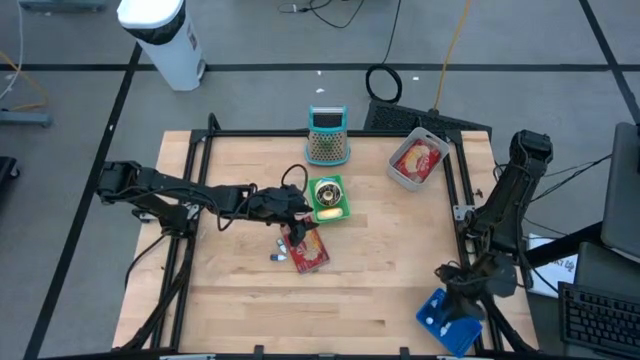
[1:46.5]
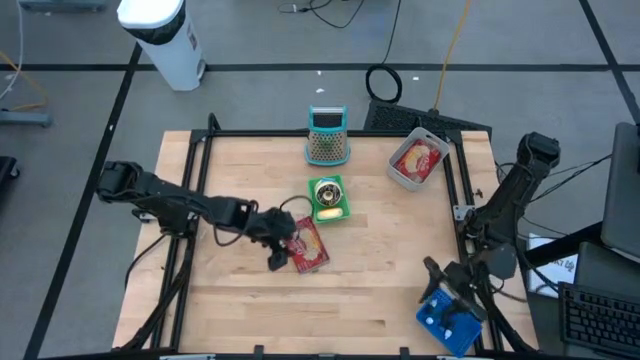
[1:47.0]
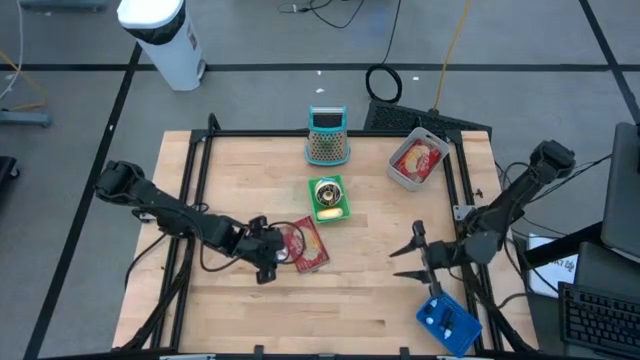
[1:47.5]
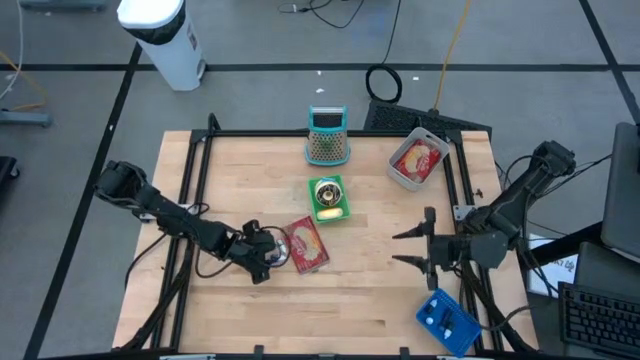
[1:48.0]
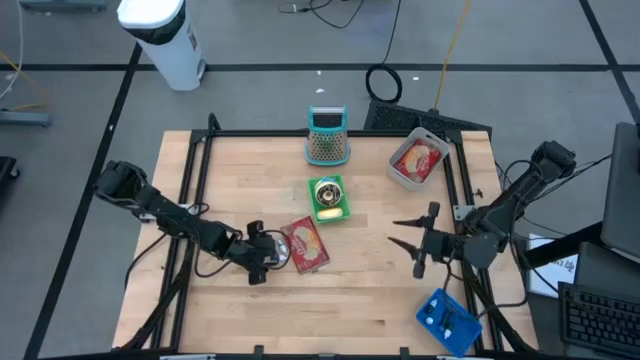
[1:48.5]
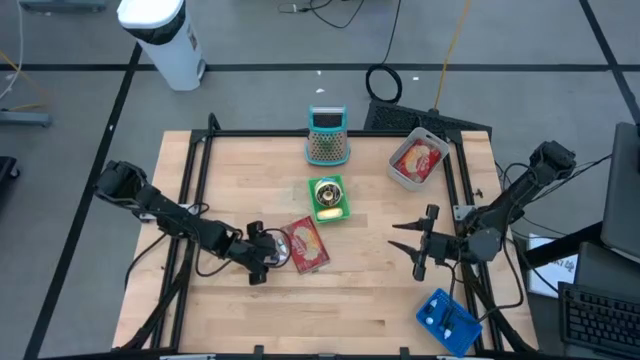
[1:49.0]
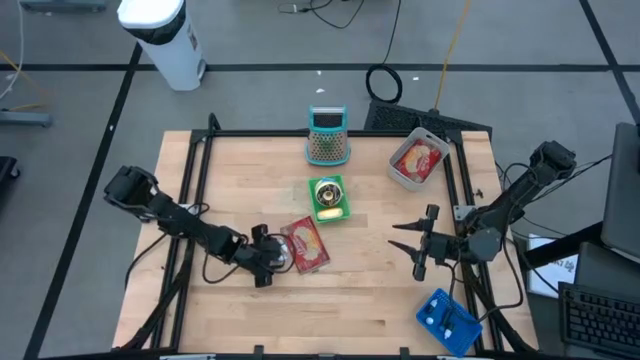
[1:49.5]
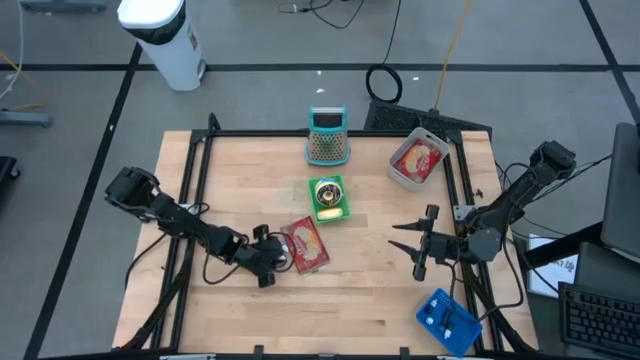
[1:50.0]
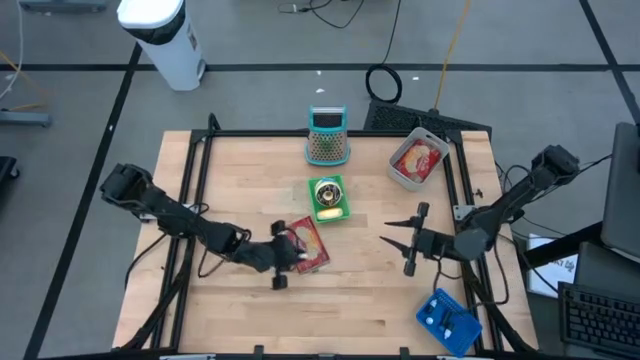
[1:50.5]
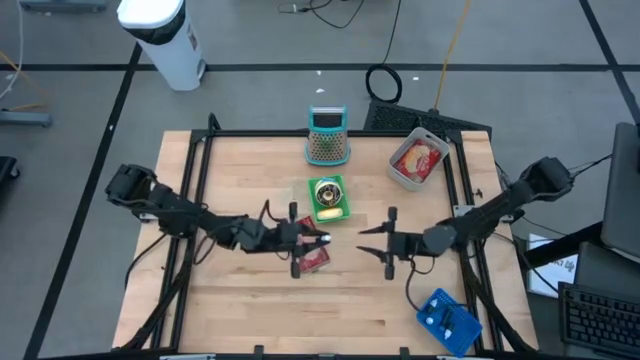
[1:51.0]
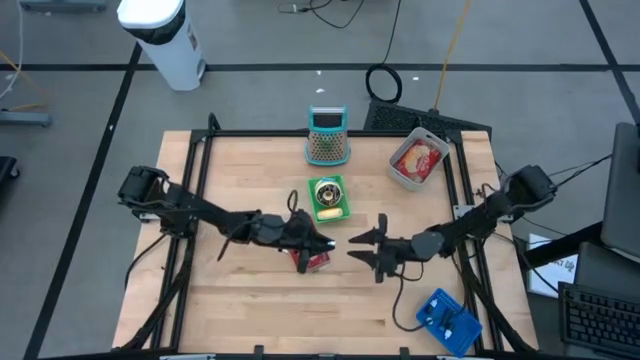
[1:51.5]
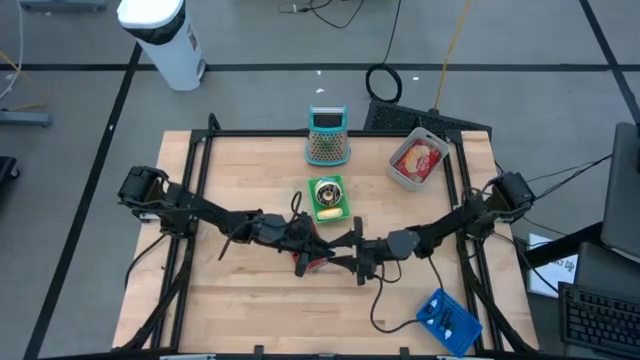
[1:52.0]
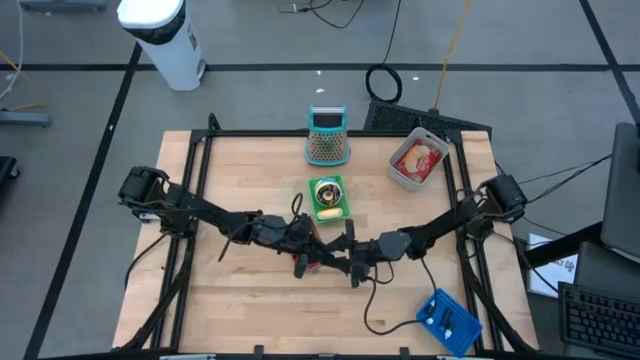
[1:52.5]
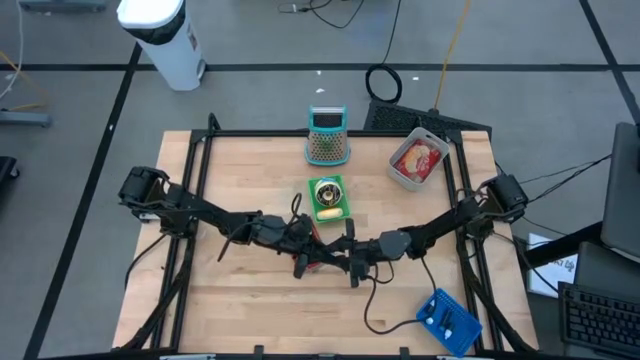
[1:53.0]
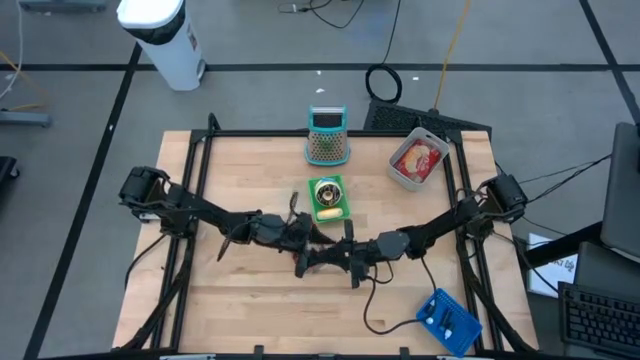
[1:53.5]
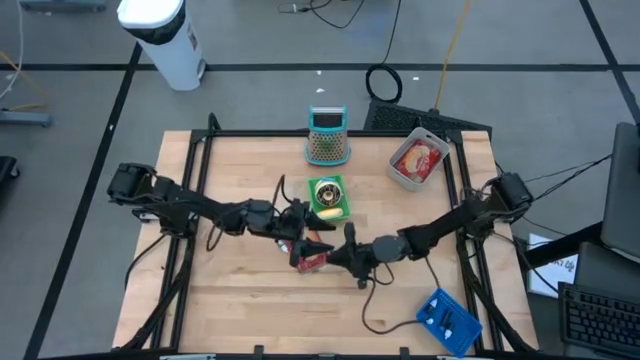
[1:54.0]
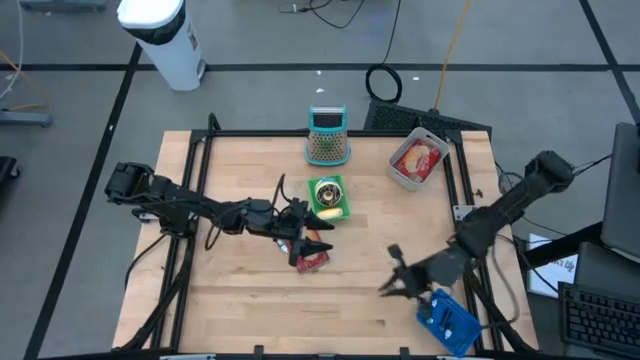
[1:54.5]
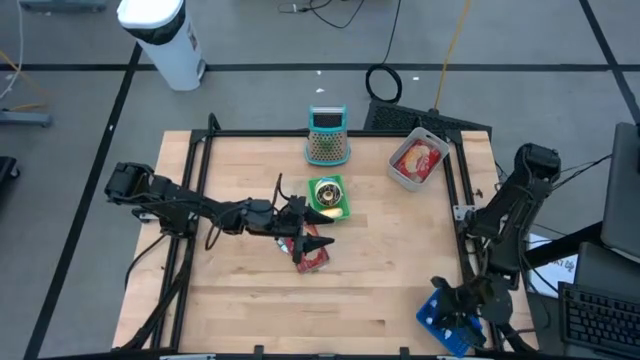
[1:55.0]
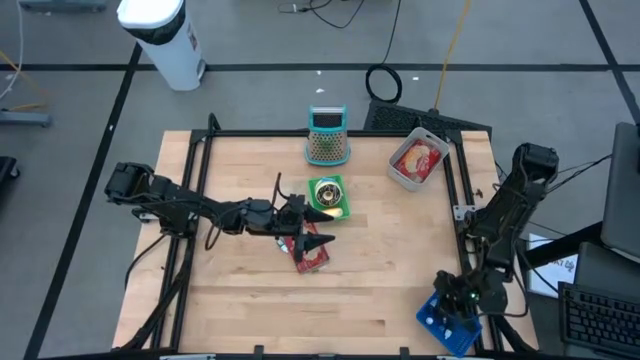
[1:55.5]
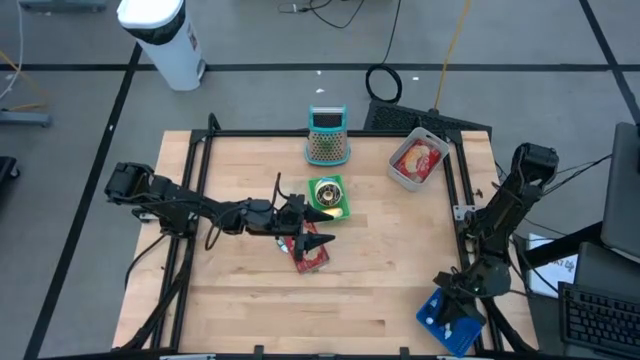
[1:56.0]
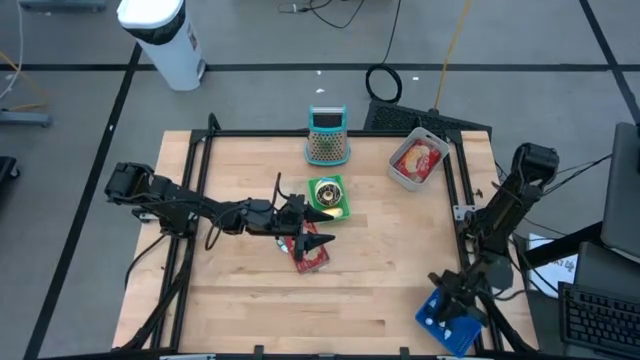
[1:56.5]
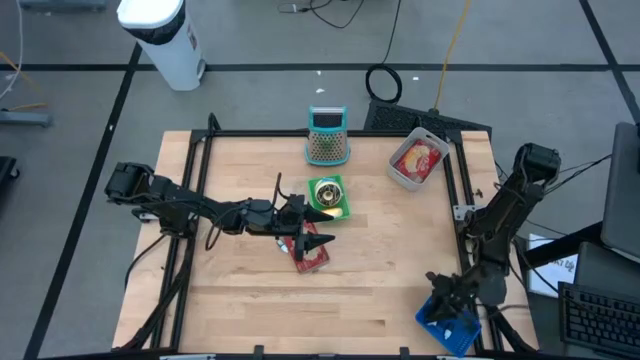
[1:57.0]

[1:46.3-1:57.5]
Put the blue food coloring bottle into the blue bin

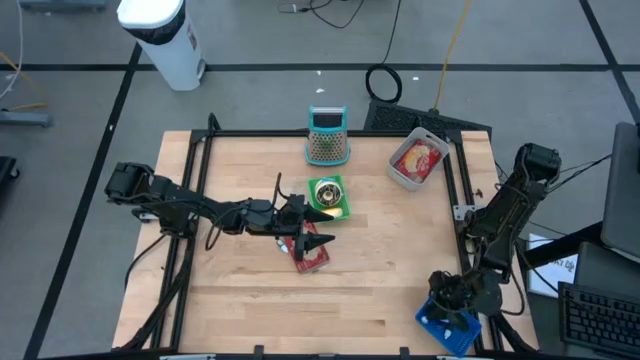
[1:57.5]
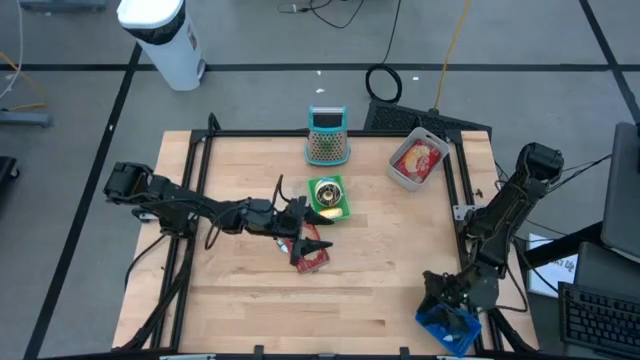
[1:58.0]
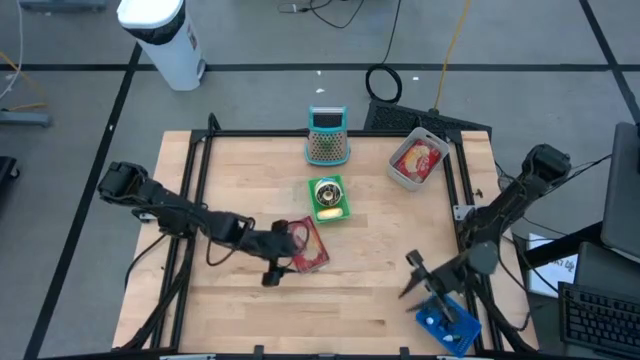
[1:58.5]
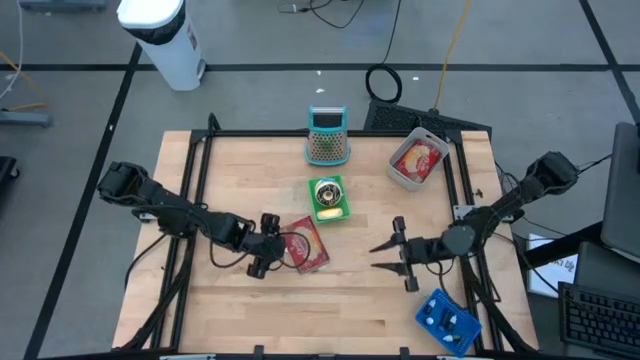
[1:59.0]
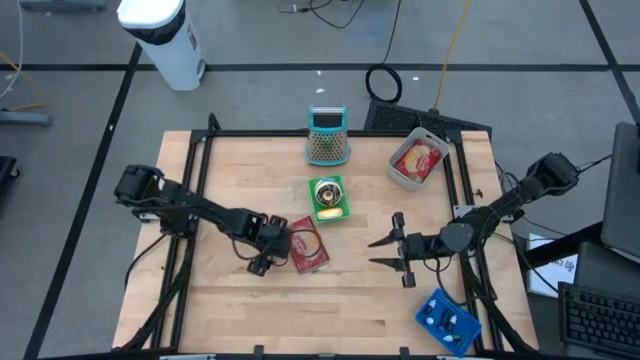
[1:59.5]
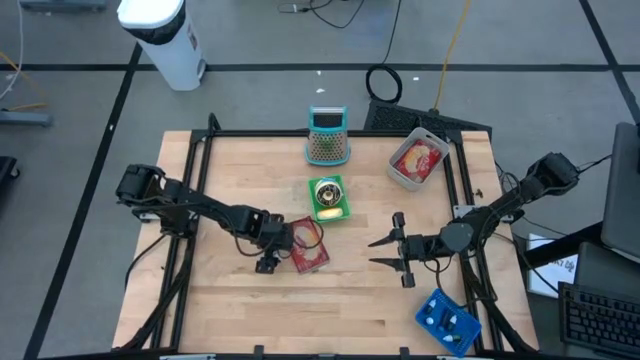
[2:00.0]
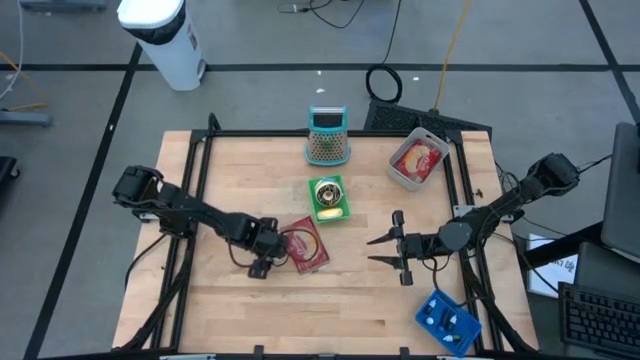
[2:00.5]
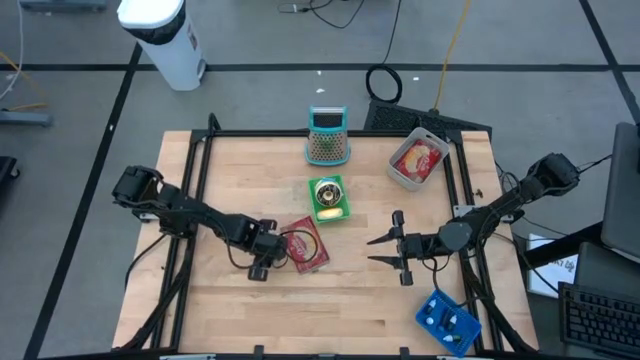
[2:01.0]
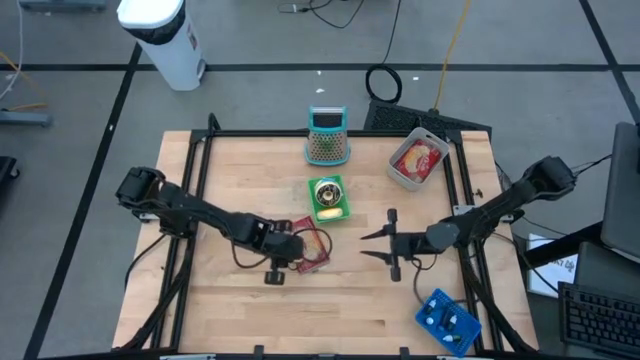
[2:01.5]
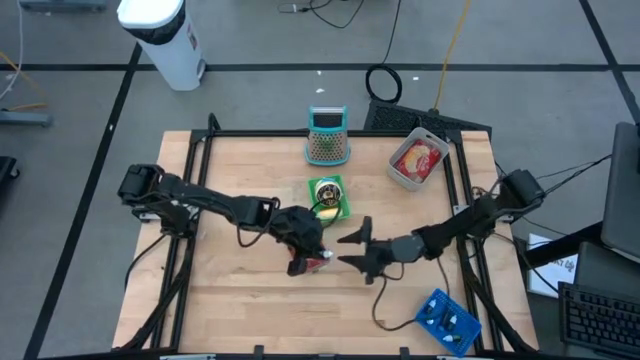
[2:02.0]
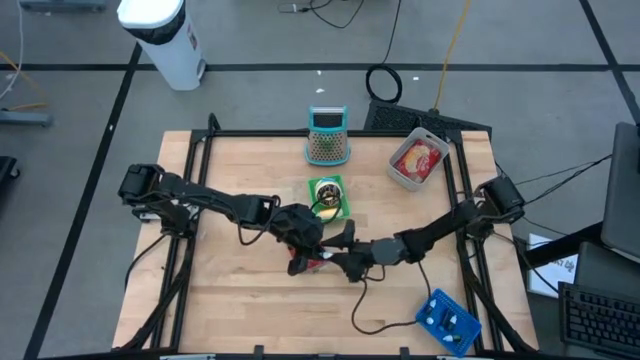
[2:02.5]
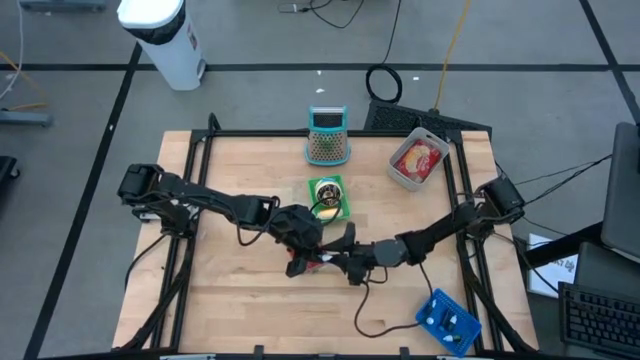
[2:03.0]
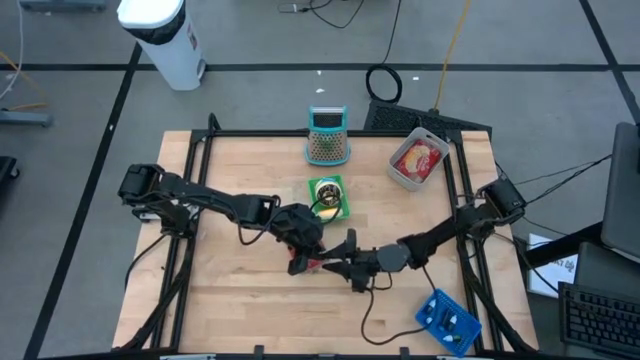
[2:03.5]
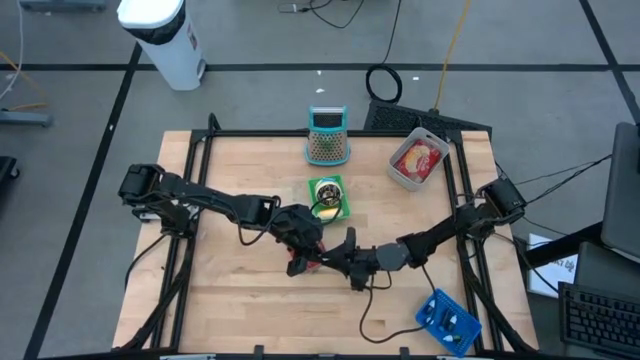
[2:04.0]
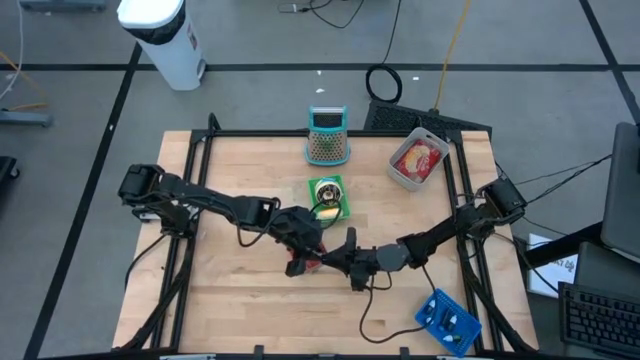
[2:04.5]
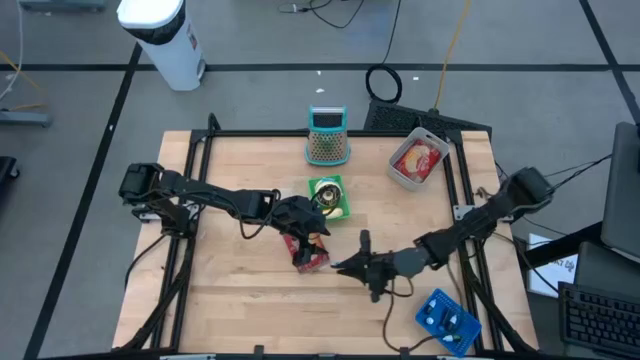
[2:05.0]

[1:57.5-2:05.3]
Put the brown food coloring bottle into the blue bin

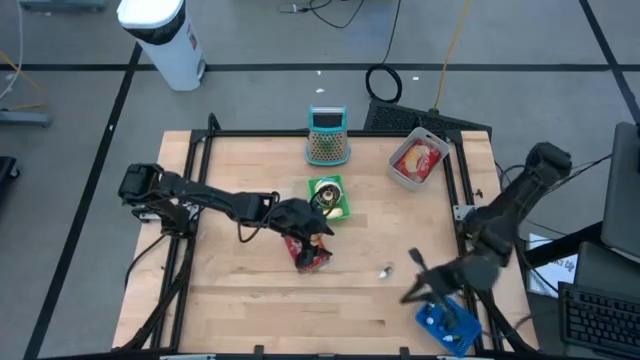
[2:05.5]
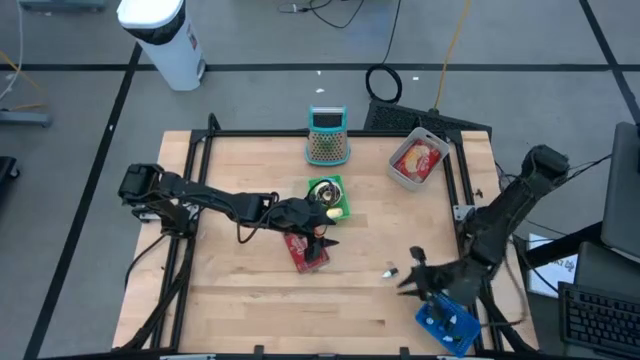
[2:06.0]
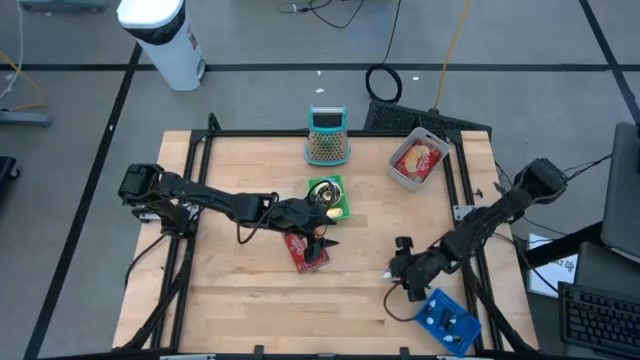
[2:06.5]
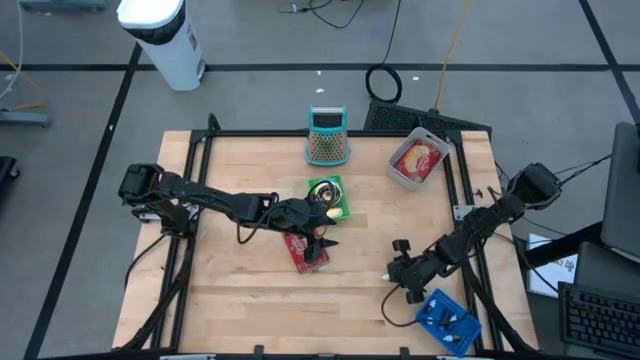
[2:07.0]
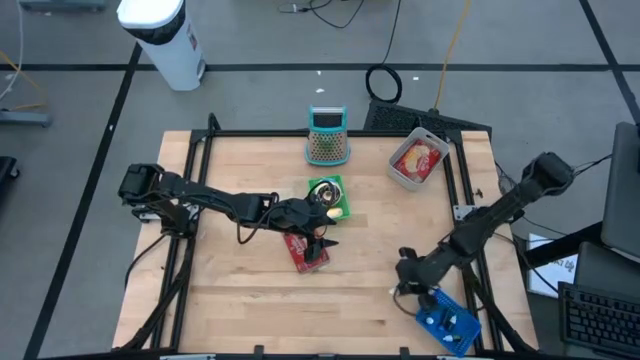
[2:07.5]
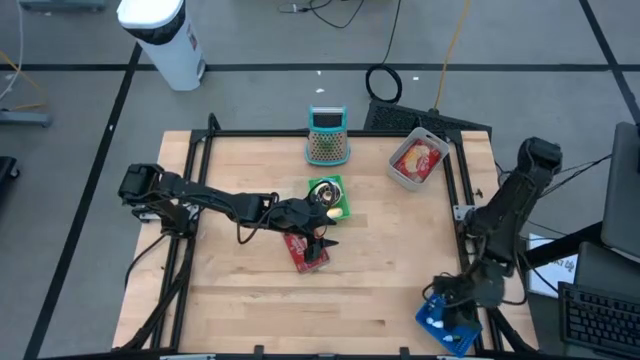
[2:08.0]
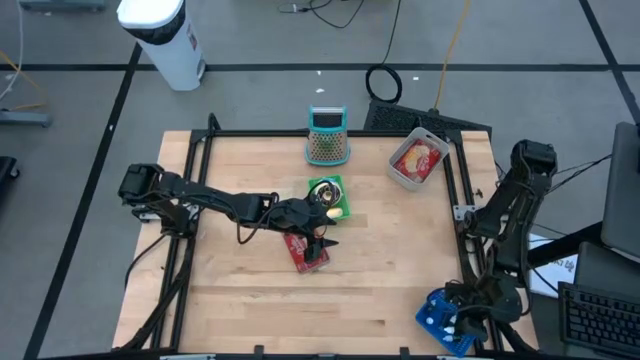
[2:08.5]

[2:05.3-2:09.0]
Put the brown food coloring bottle into the blue bin
